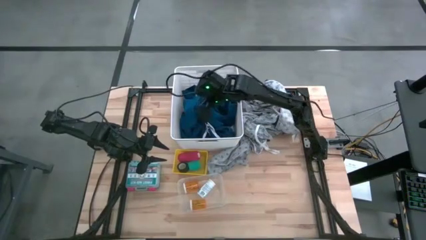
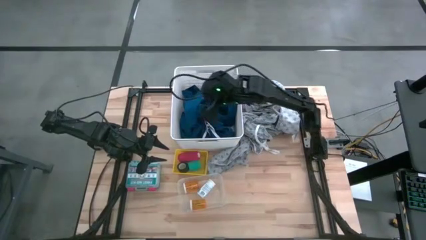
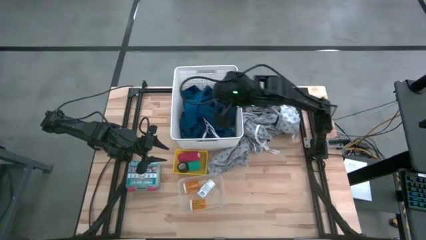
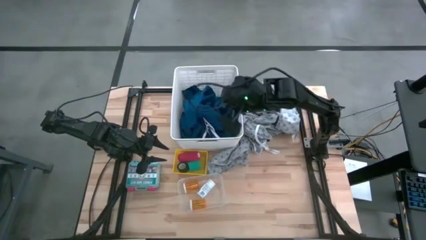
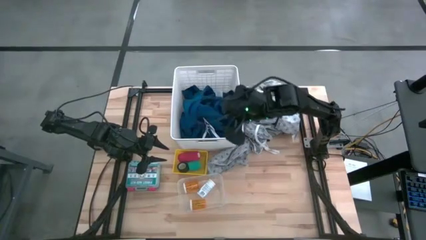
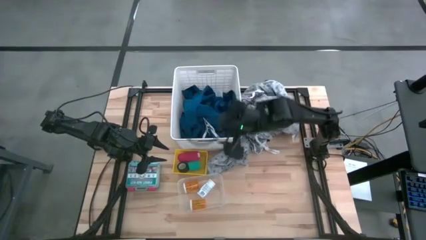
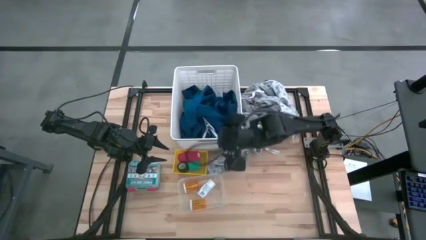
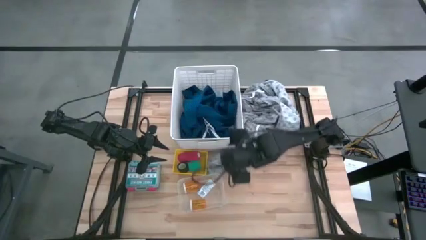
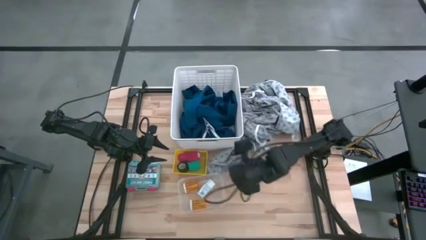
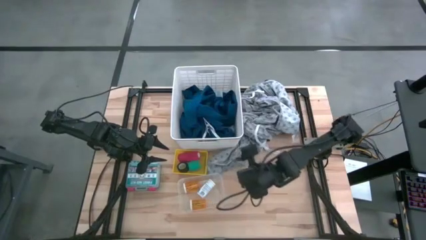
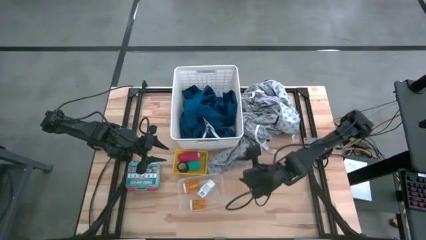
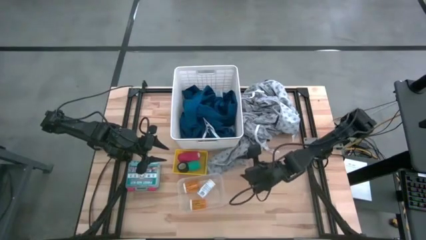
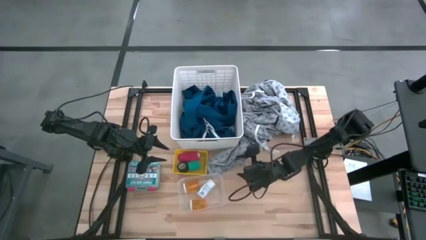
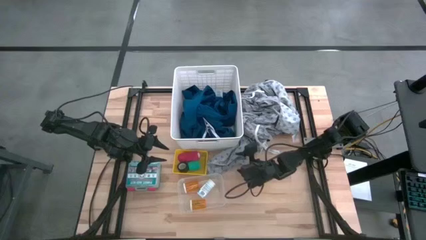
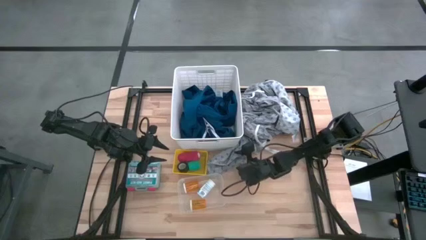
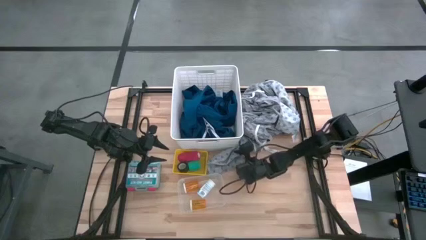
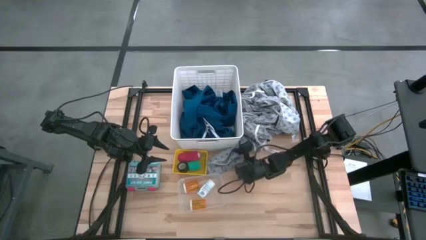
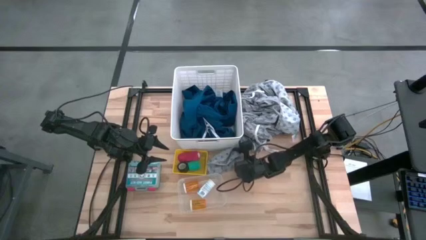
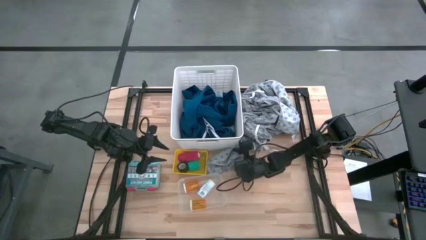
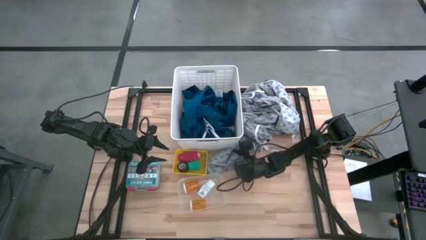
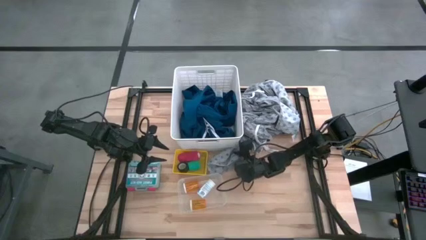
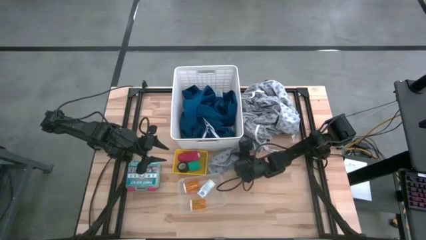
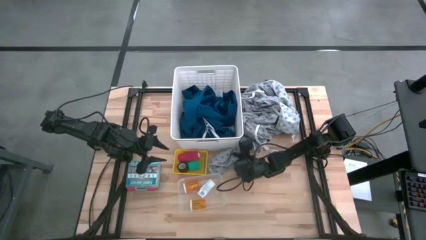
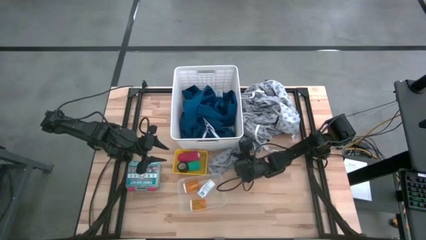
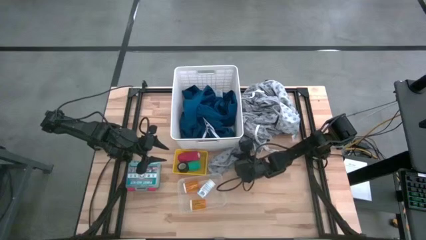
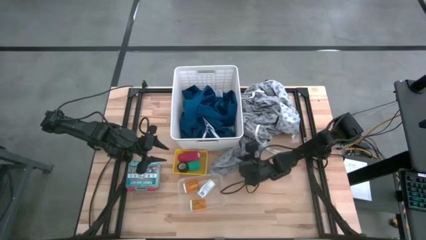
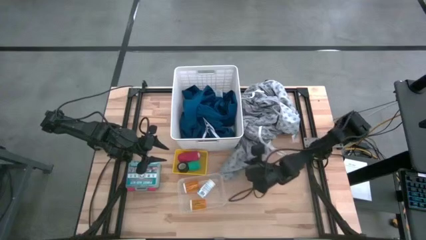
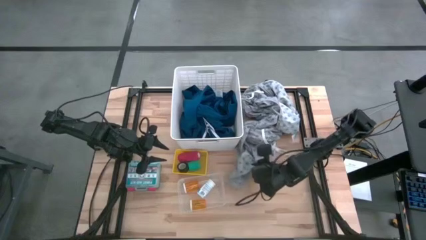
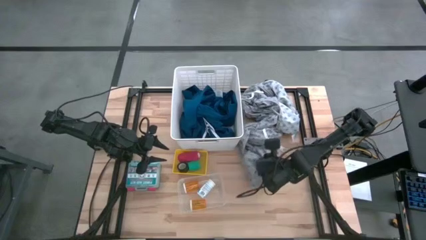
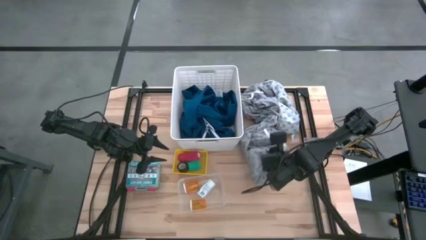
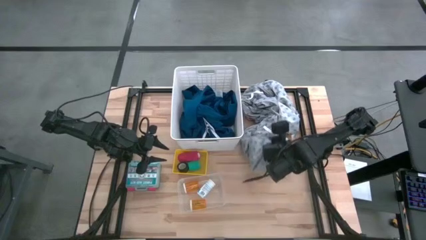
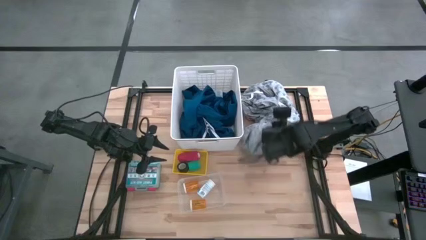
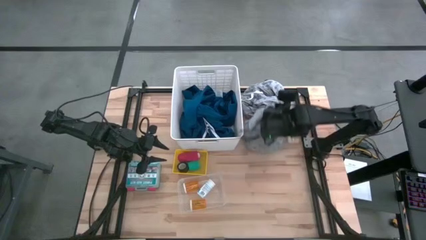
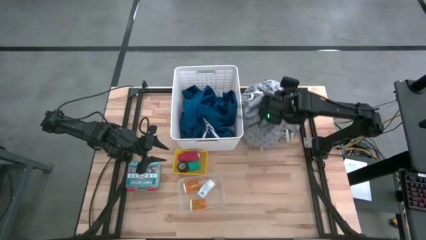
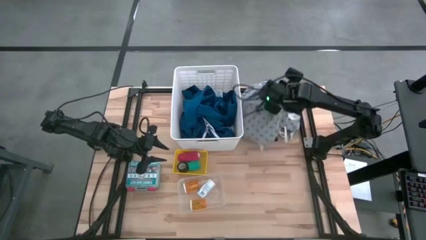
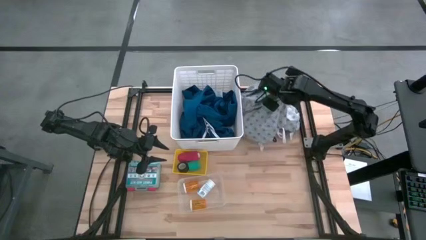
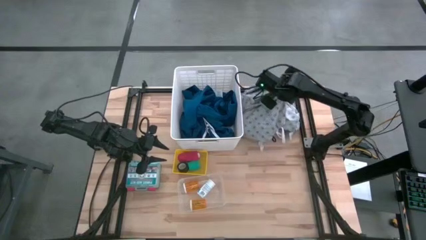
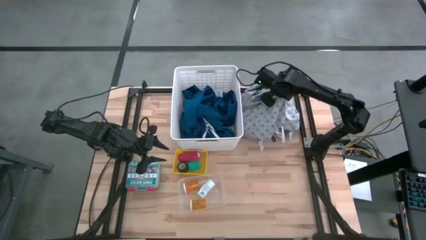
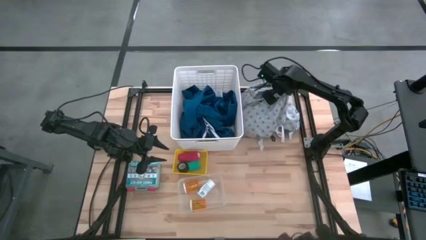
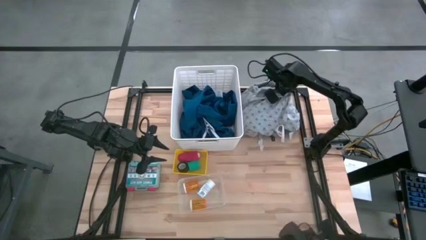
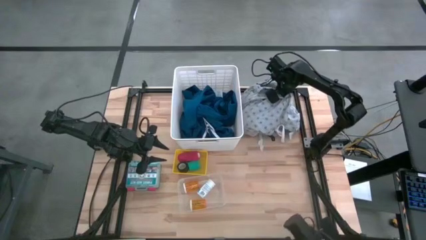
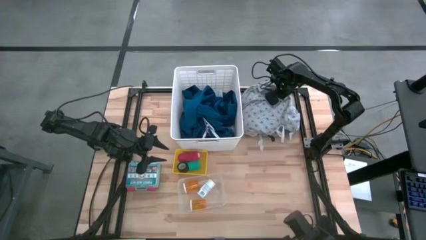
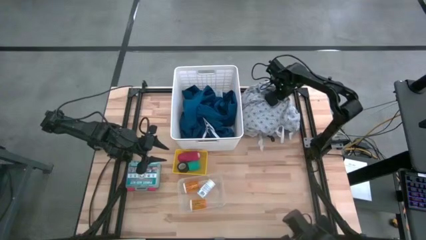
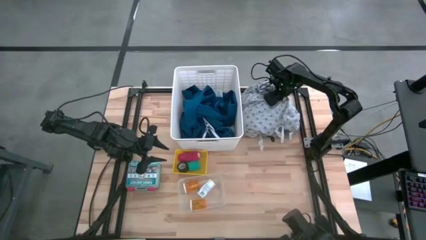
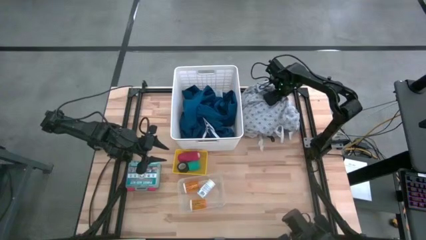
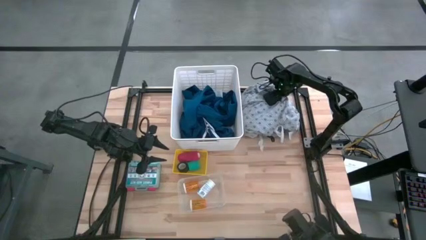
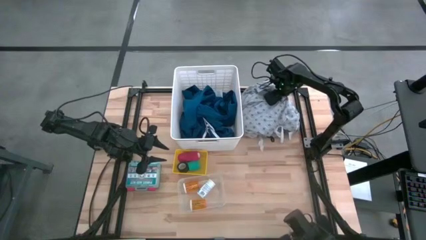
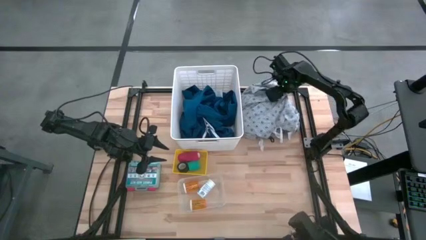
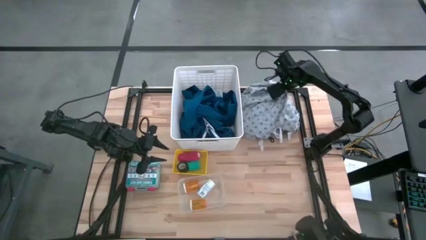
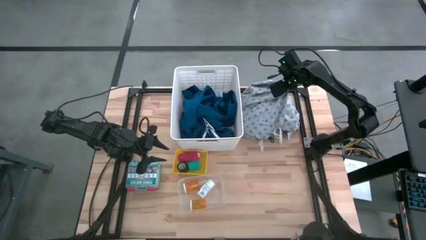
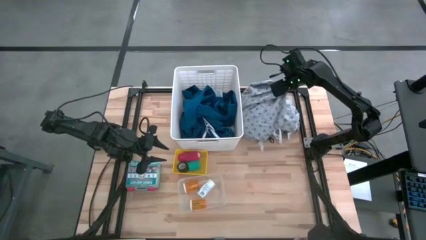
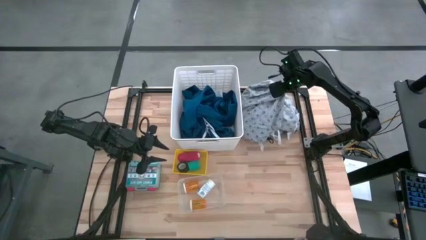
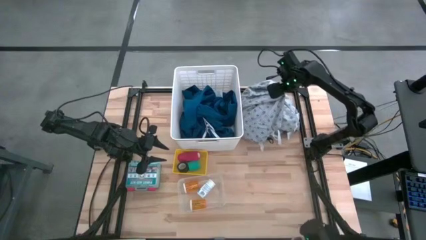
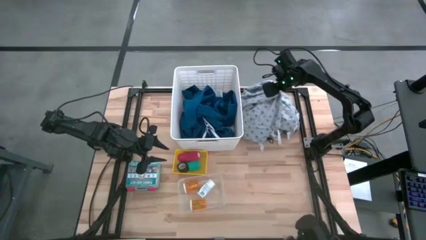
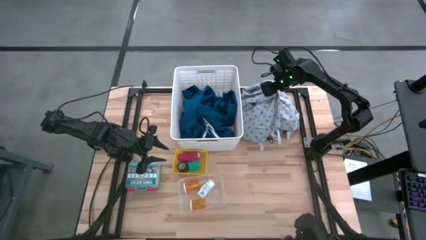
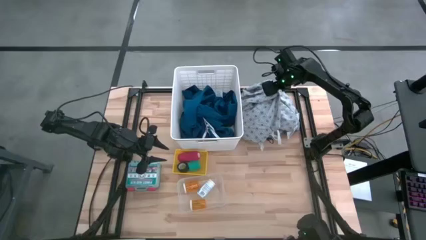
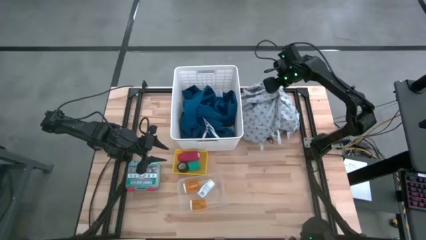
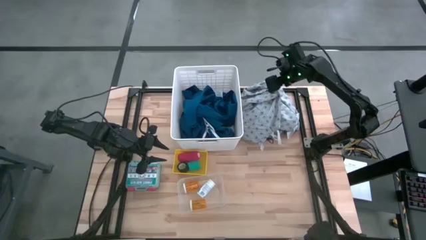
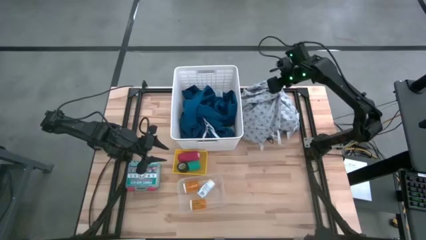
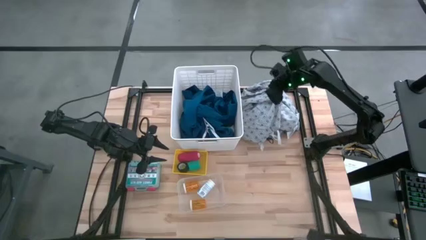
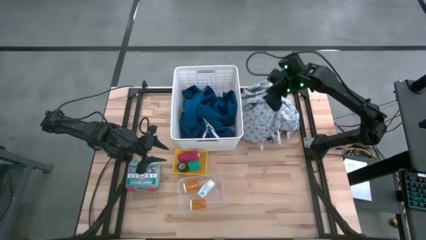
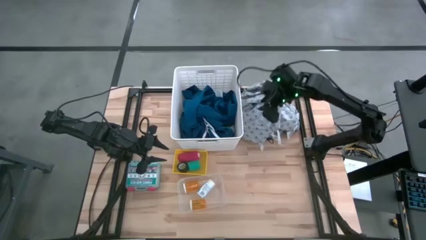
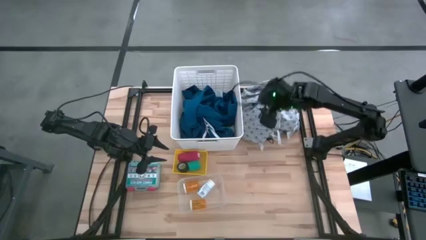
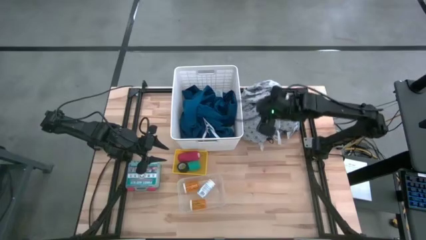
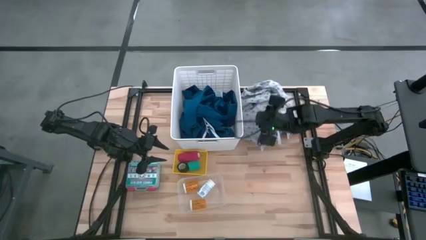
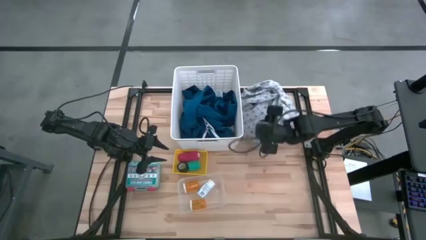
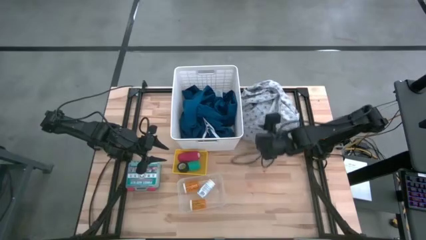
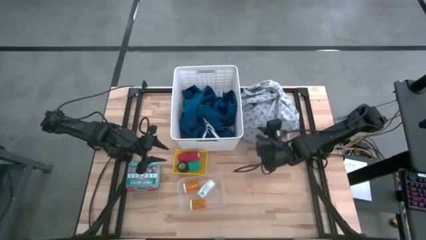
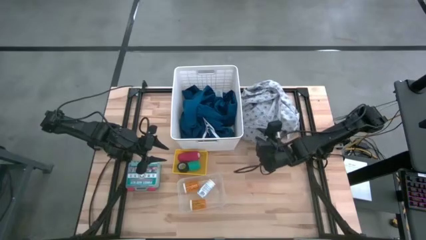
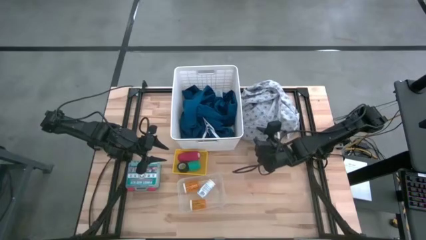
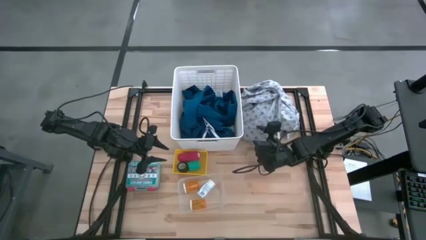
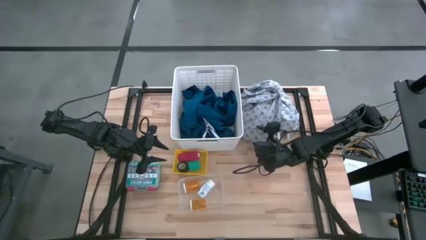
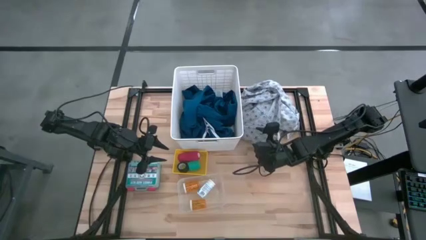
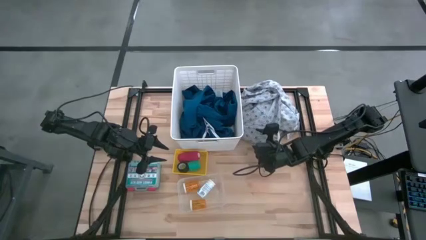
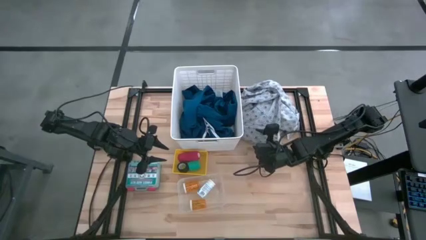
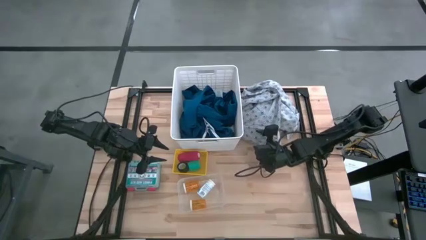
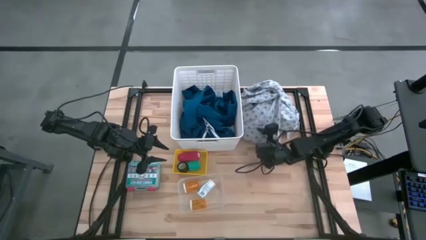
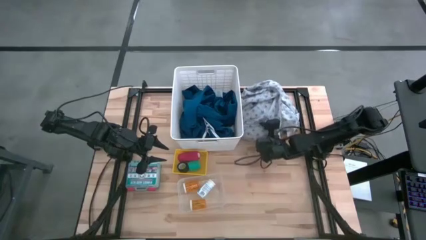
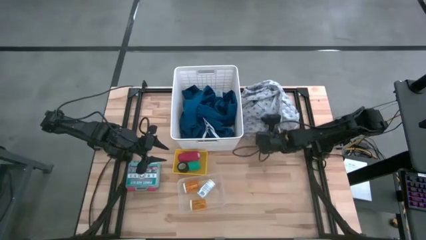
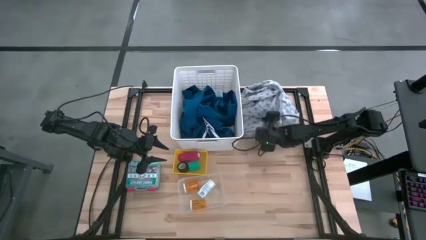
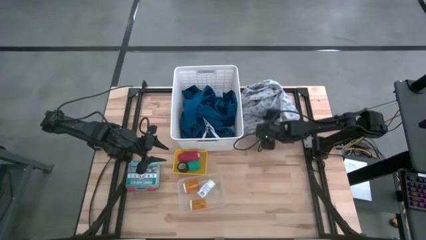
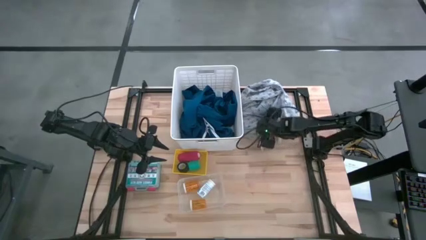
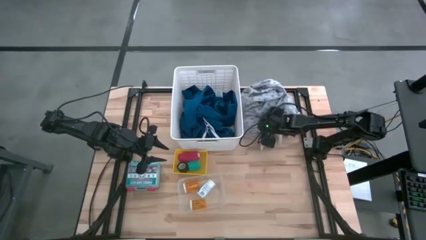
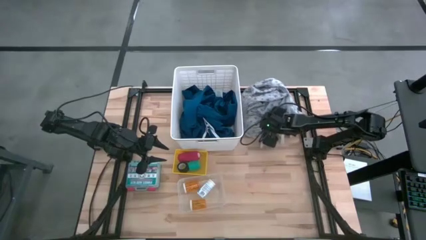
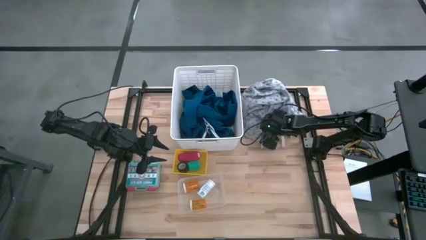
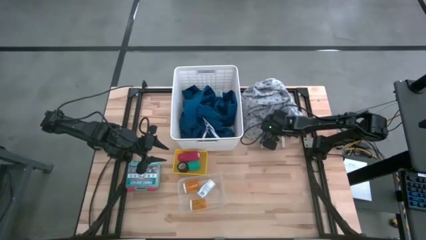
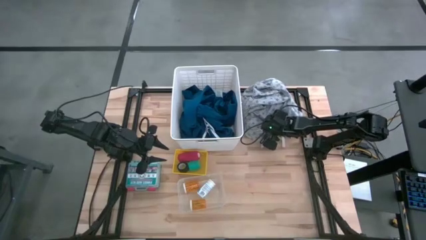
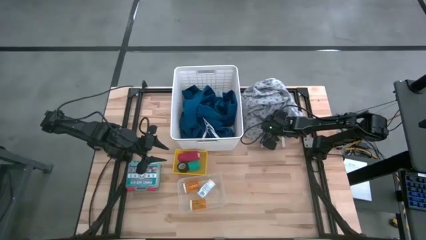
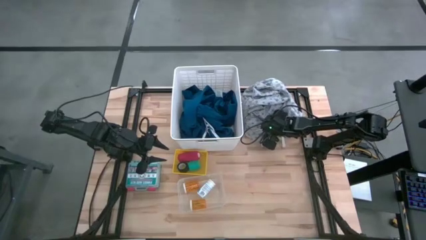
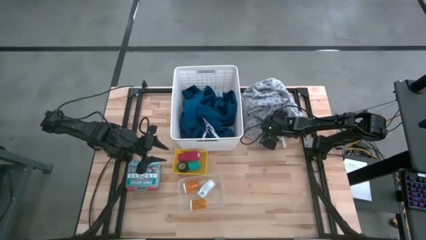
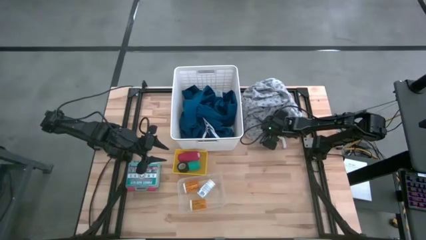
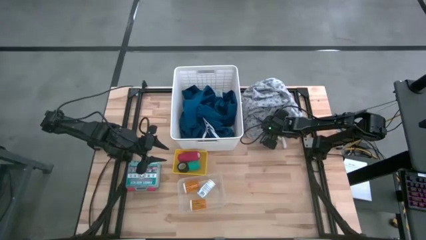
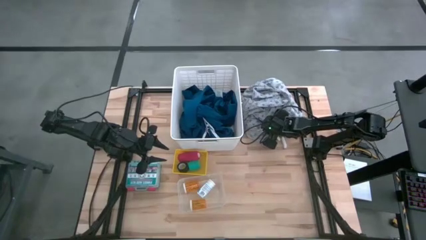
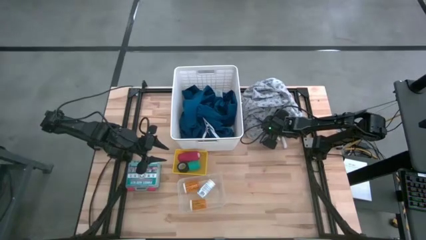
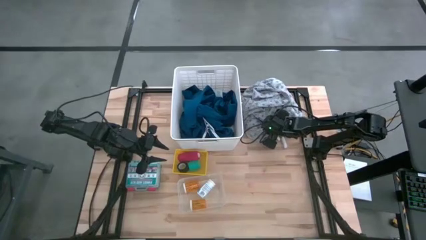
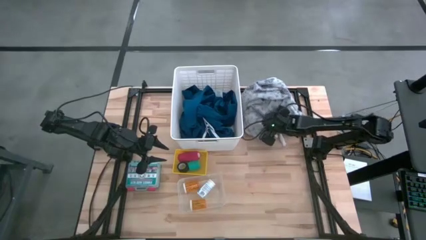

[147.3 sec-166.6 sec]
Task: Pick & Place Medicine items
Put the gray lapover patient gown into the white laundry bin
